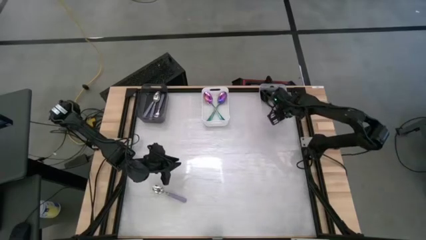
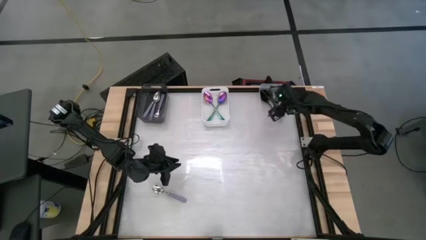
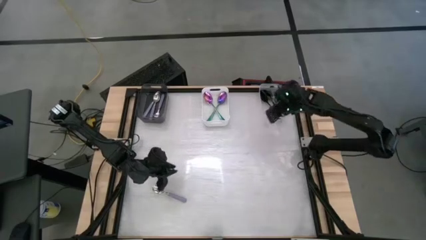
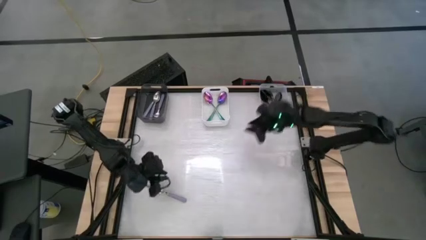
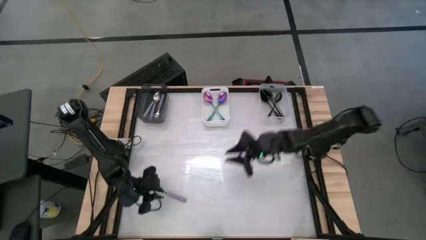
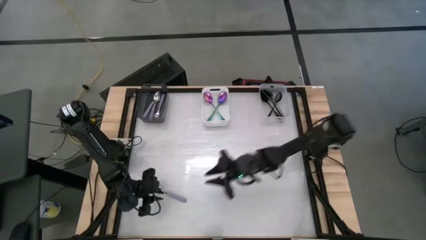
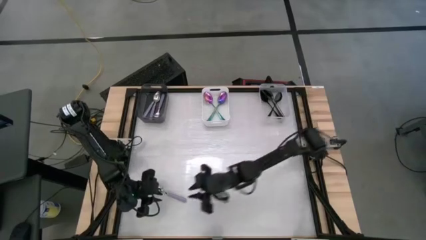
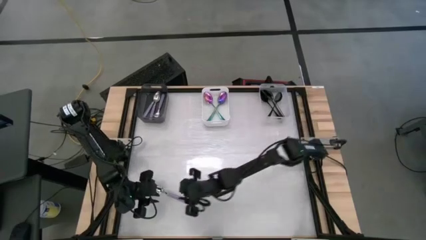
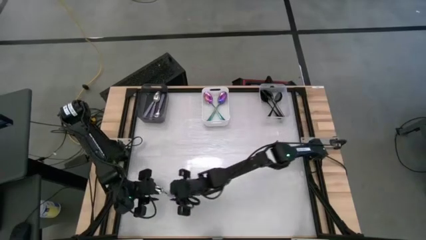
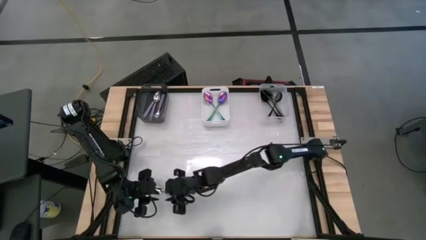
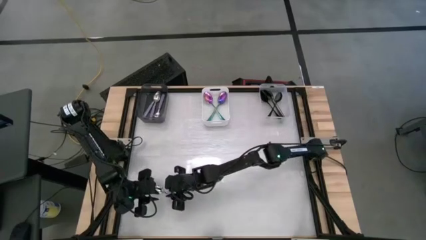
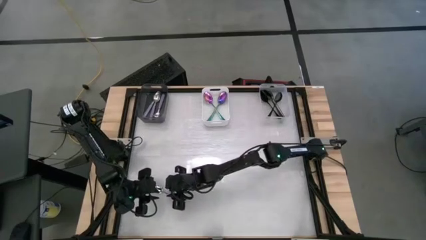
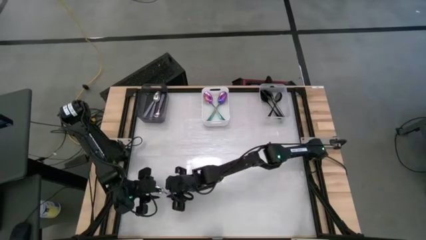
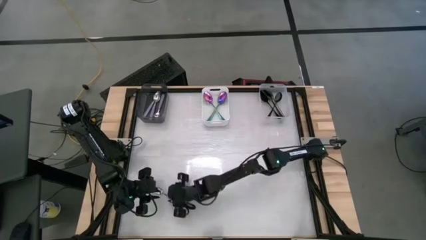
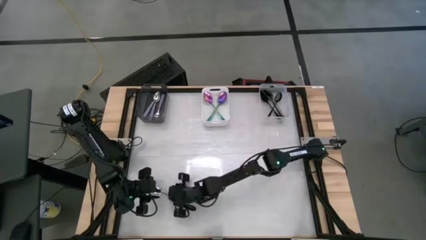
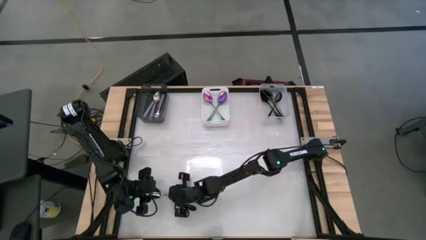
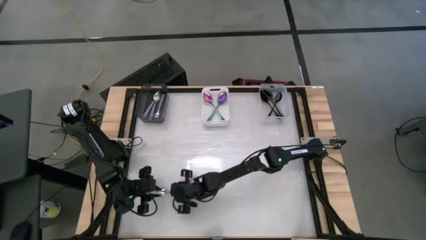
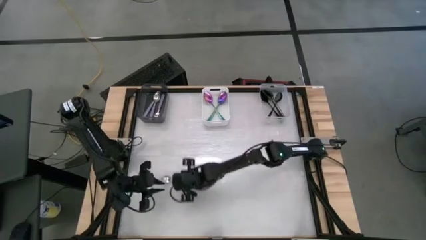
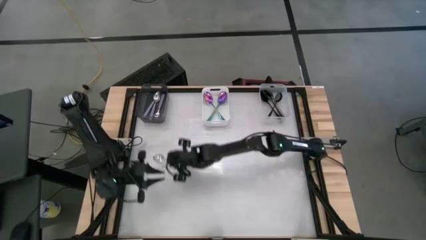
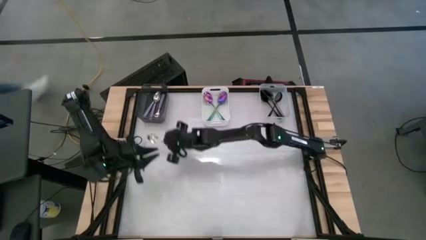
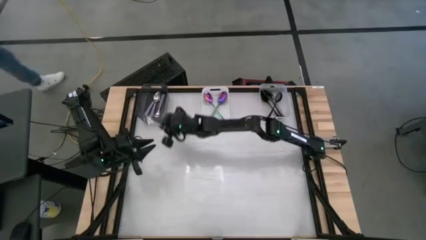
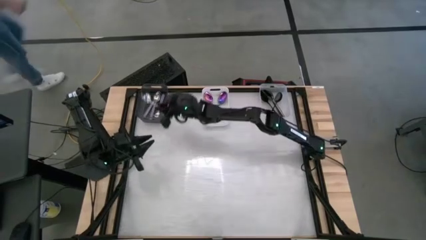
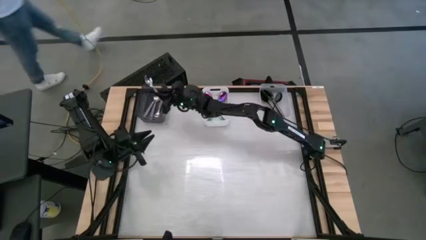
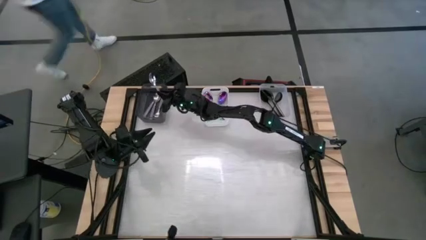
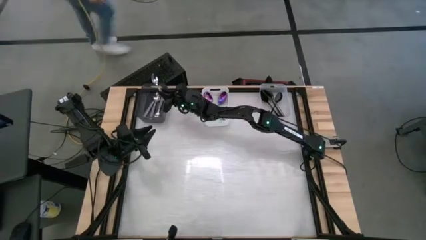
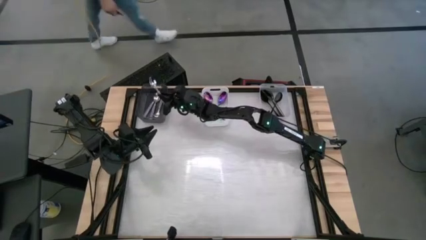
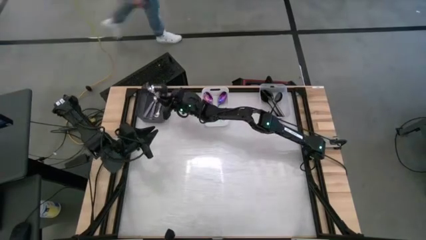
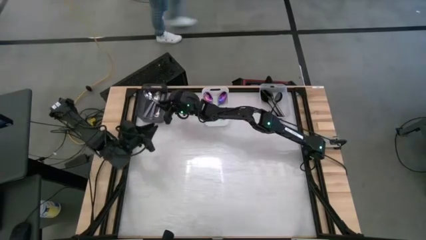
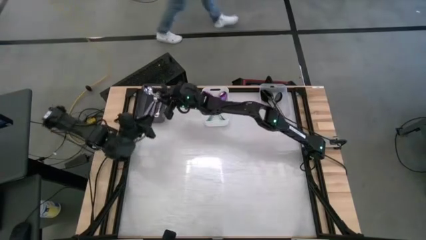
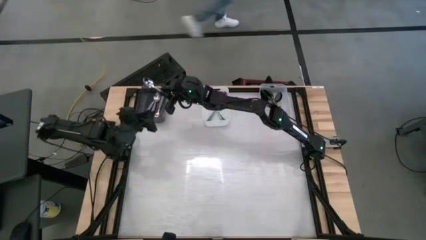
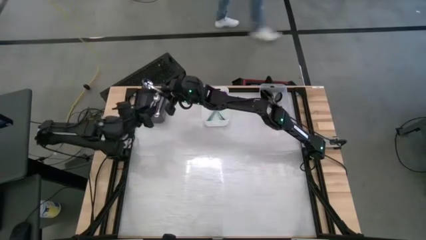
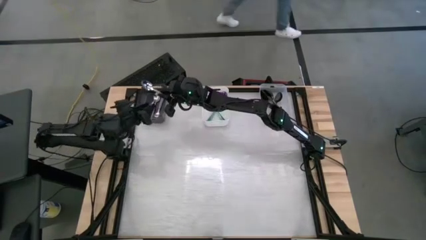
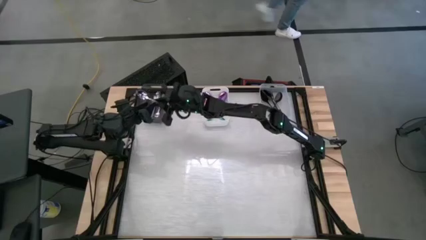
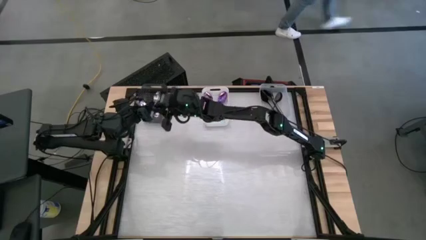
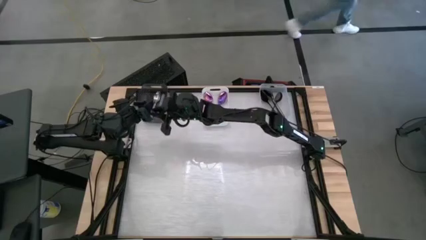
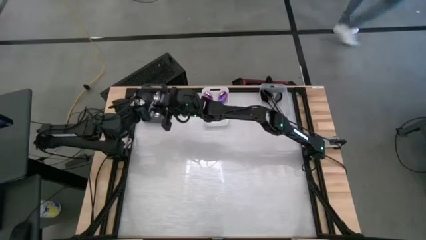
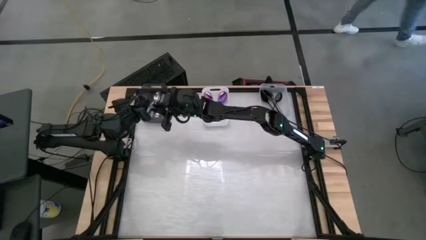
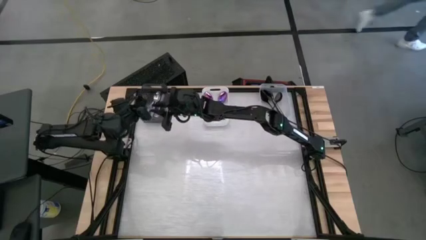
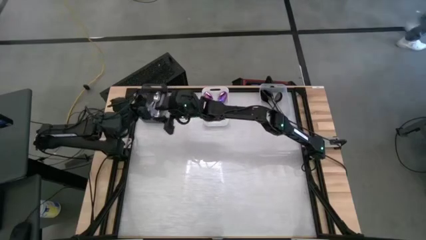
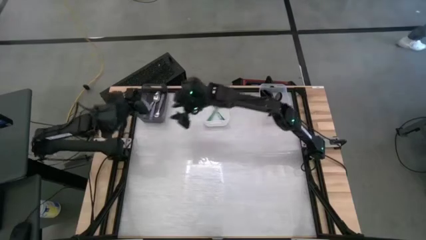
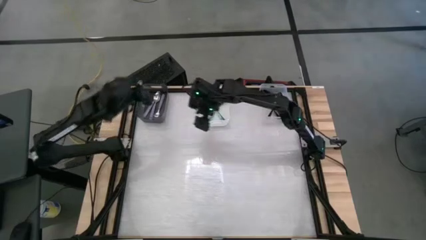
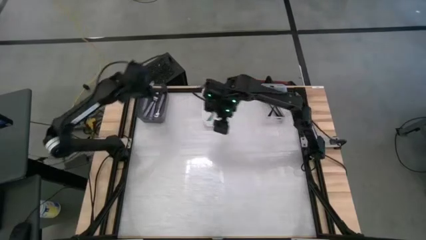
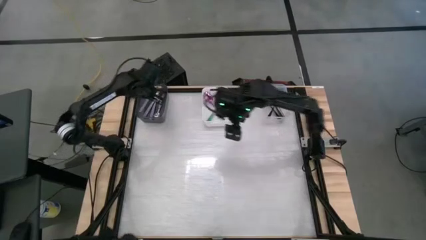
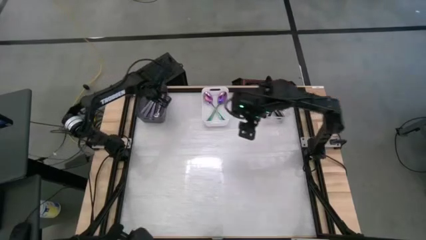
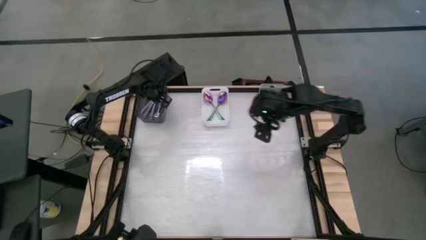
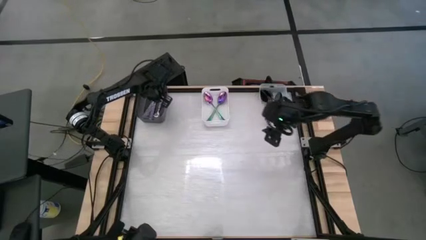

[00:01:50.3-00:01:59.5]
Task: Sort silverware by color (type)
Put the purple spoon into the transparent black bin

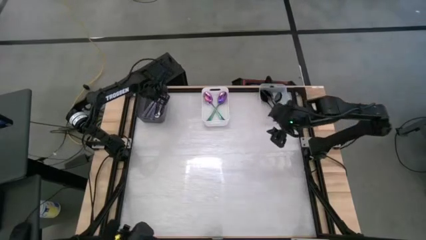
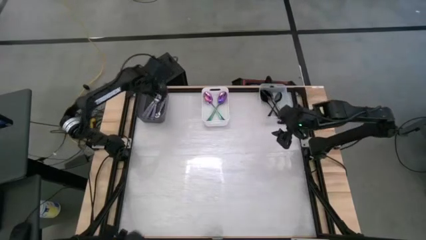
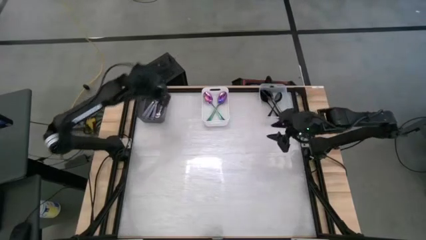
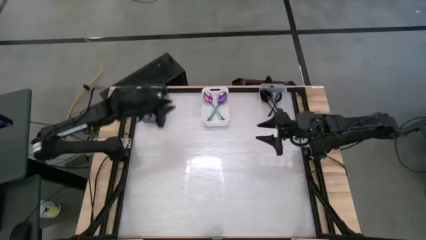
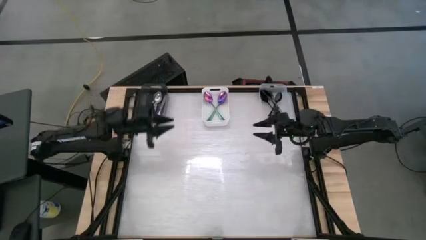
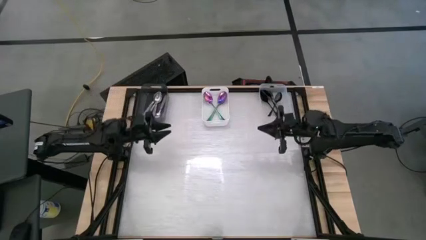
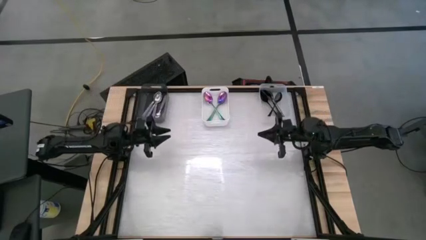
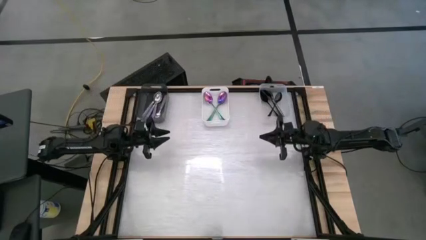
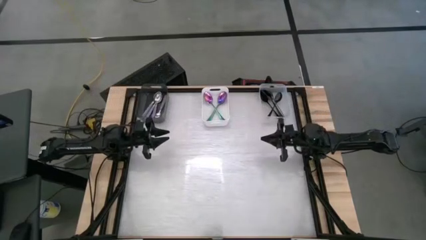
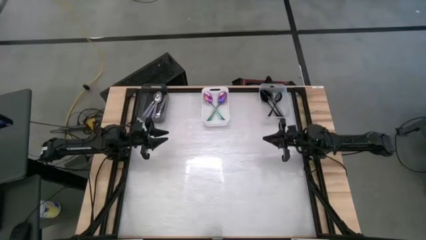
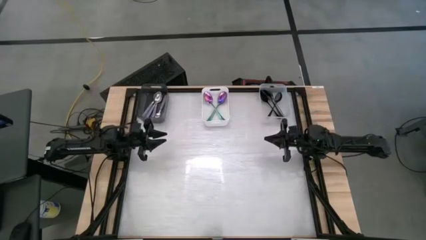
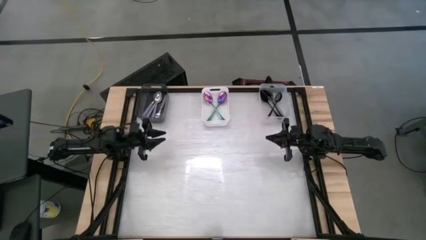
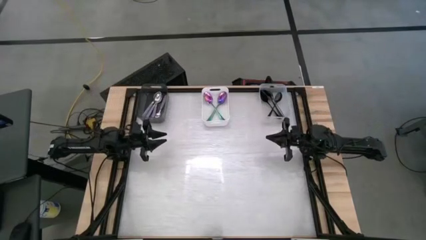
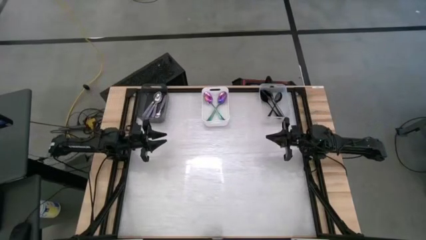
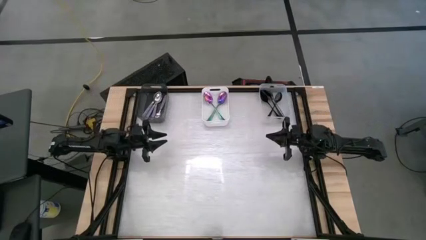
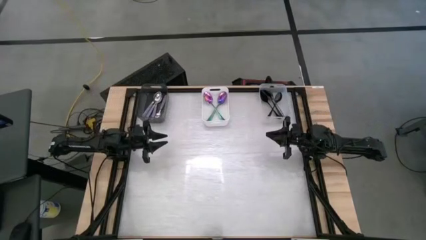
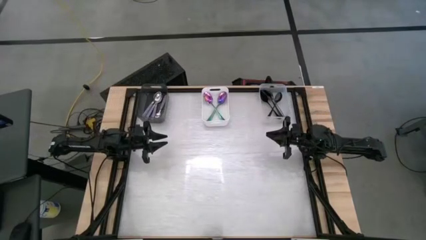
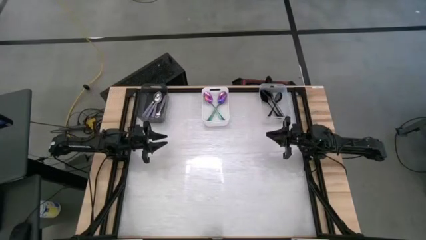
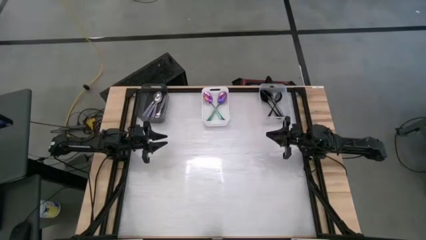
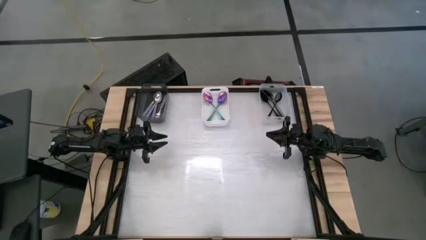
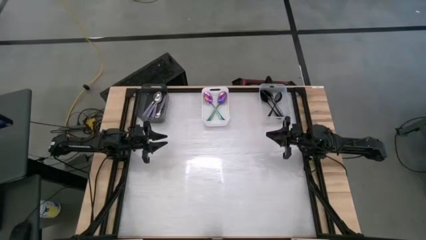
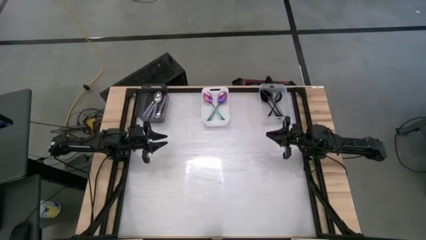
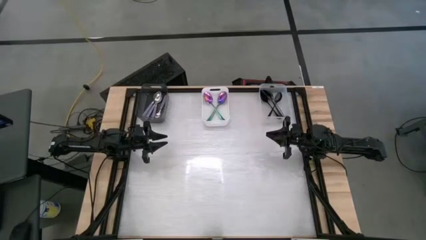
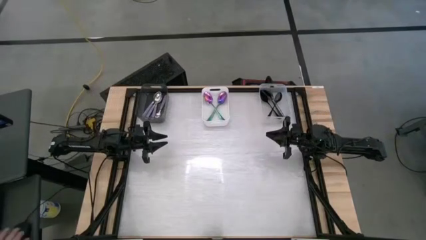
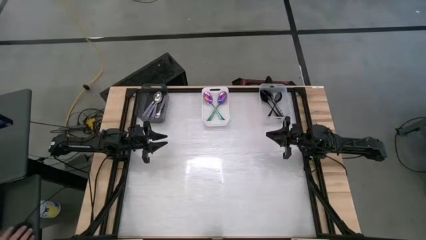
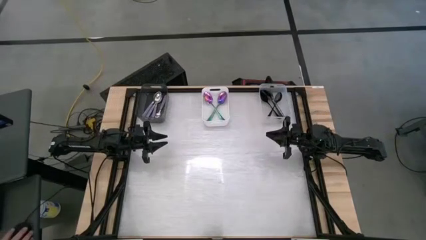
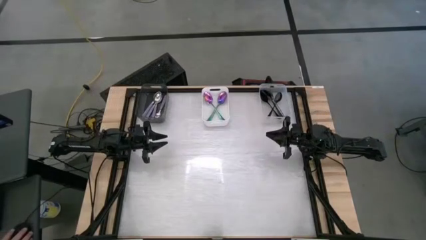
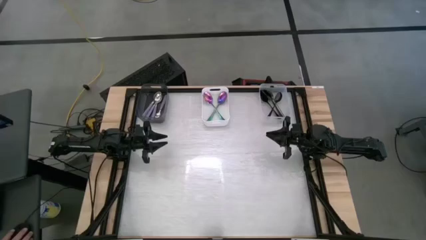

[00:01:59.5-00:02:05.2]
Return to Home Position

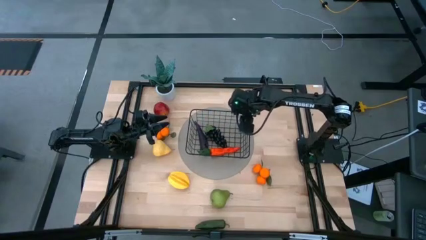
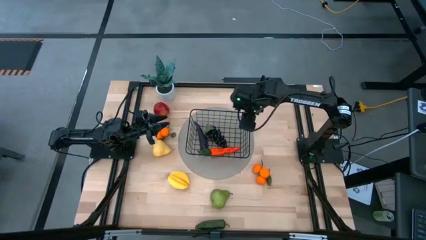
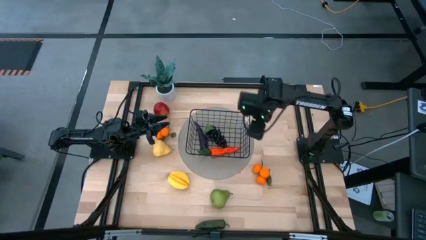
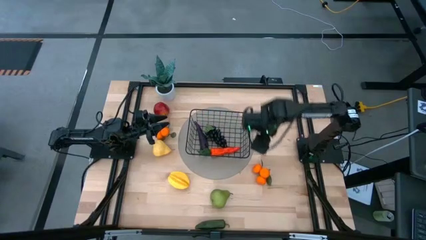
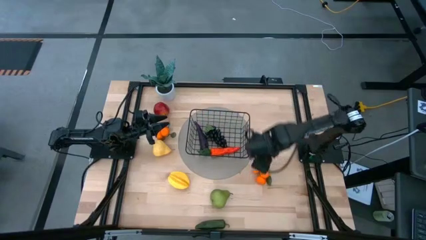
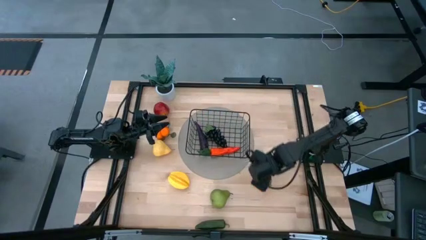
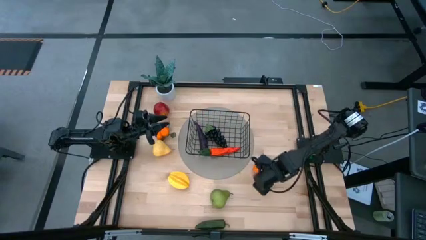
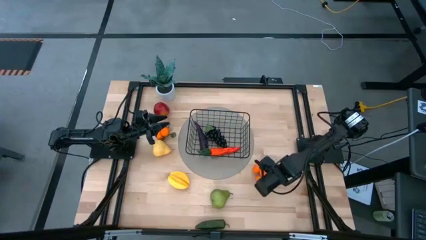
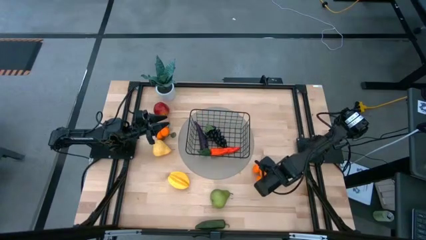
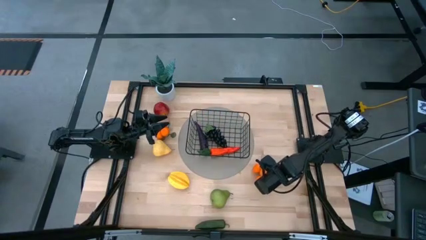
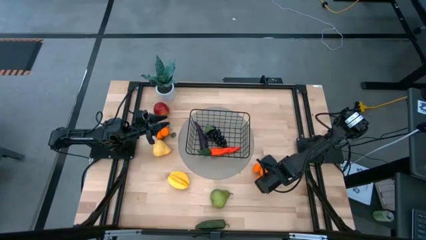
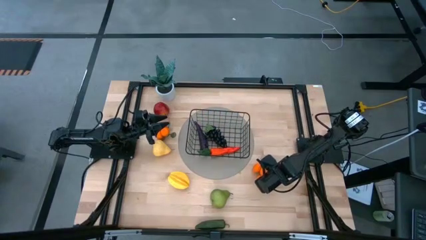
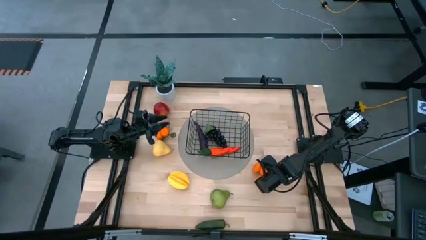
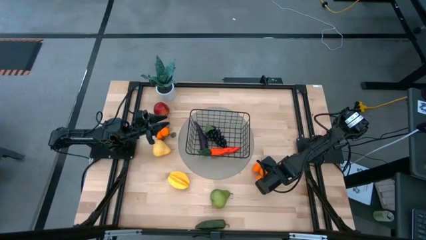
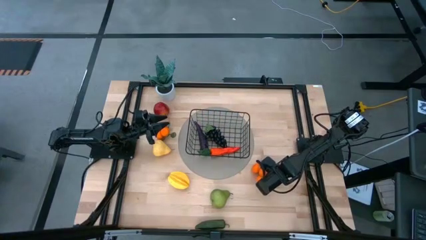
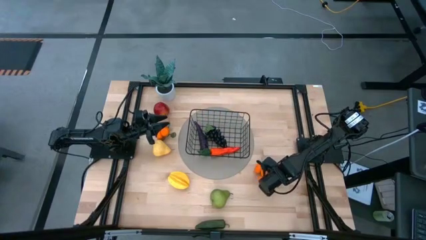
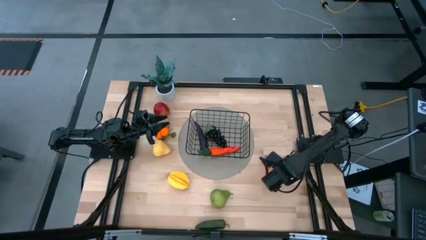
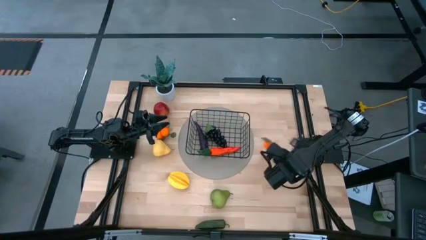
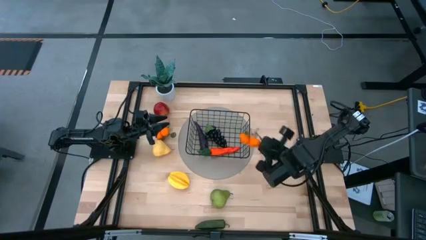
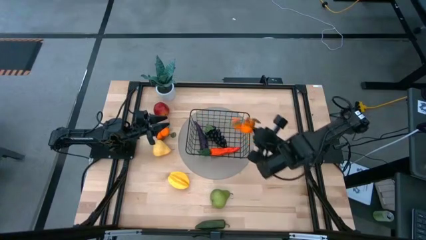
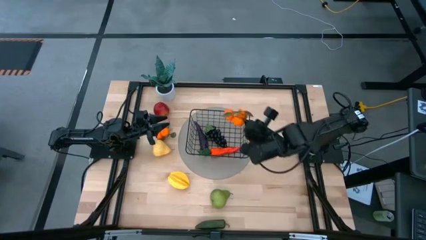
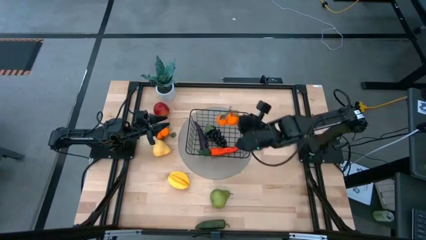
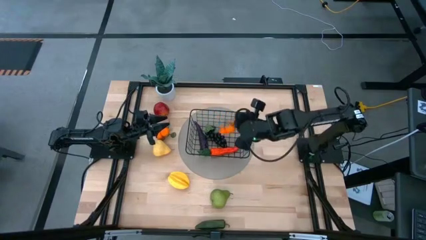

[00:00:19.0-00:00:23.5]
Task: Build produce basket
Put the orange tangerines into the black wire basket
